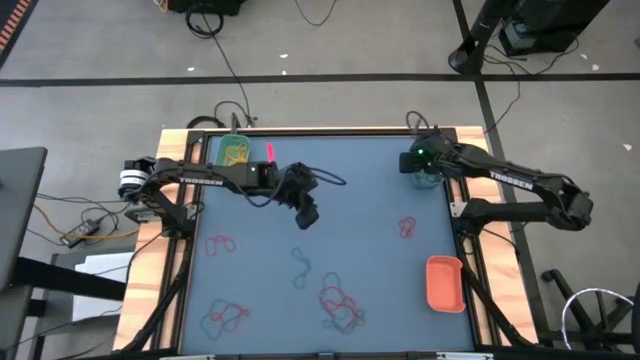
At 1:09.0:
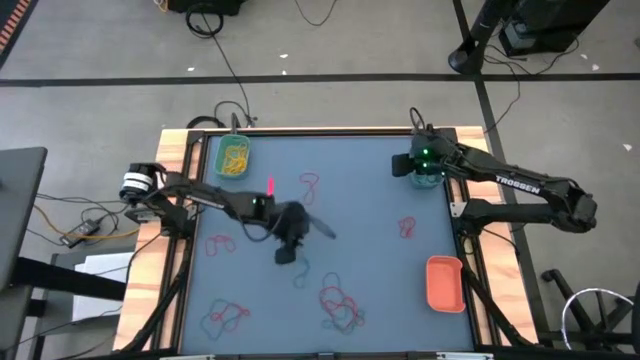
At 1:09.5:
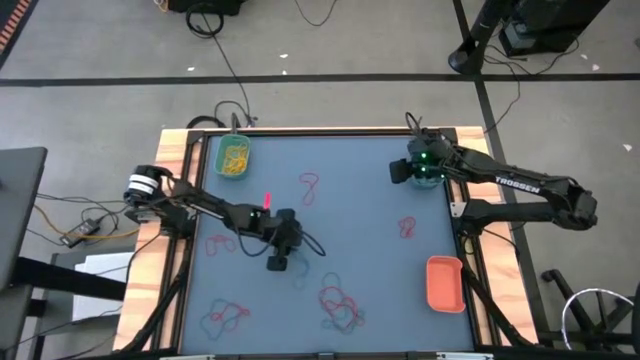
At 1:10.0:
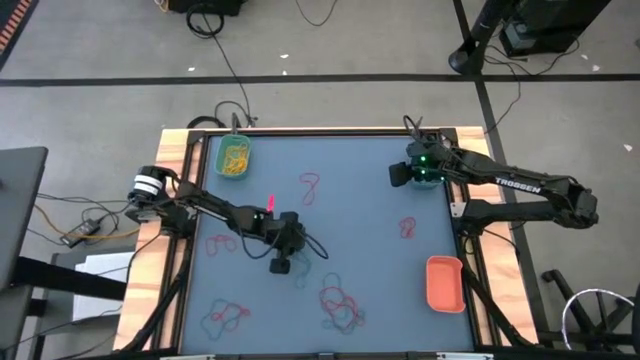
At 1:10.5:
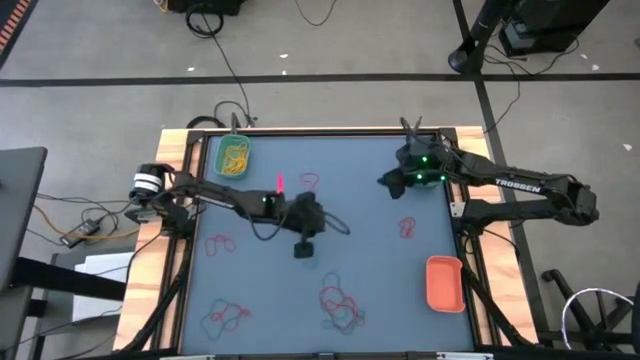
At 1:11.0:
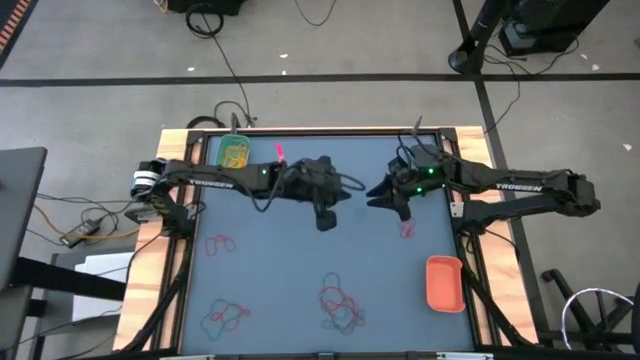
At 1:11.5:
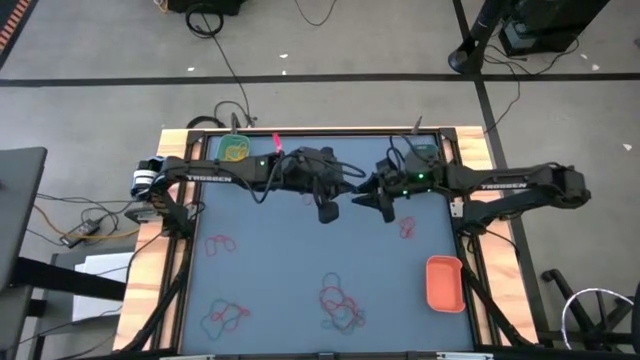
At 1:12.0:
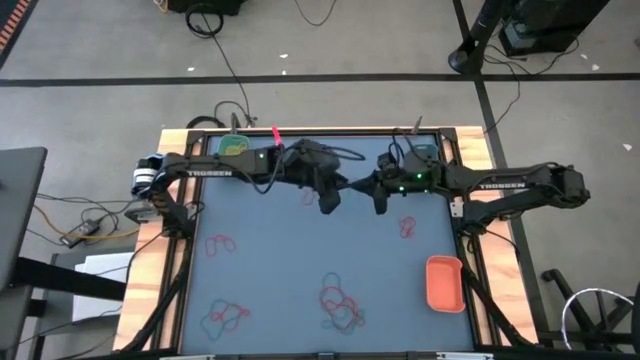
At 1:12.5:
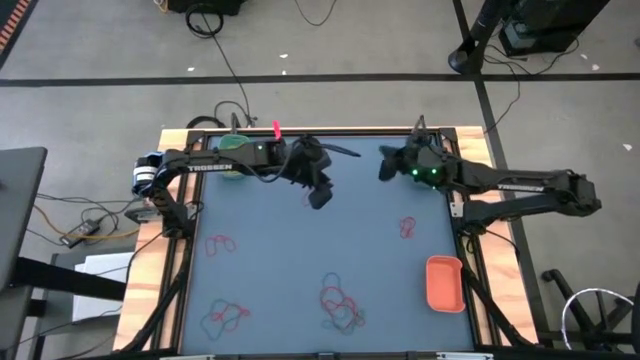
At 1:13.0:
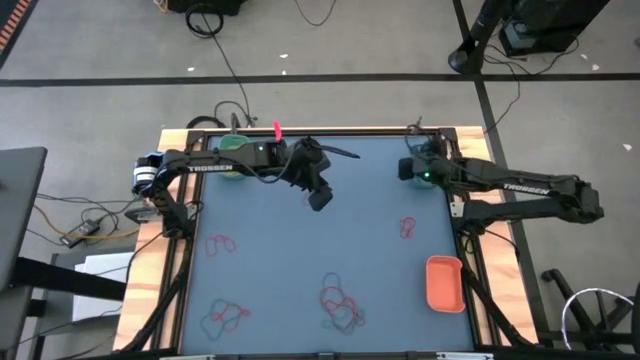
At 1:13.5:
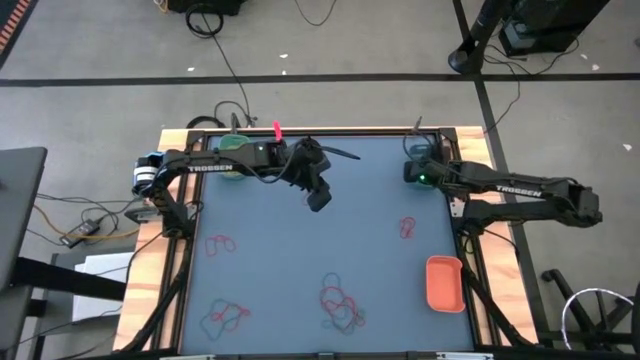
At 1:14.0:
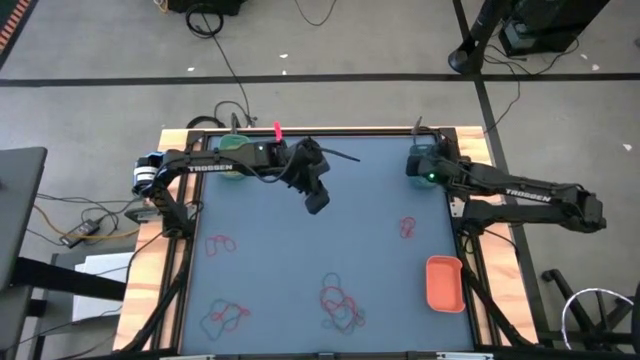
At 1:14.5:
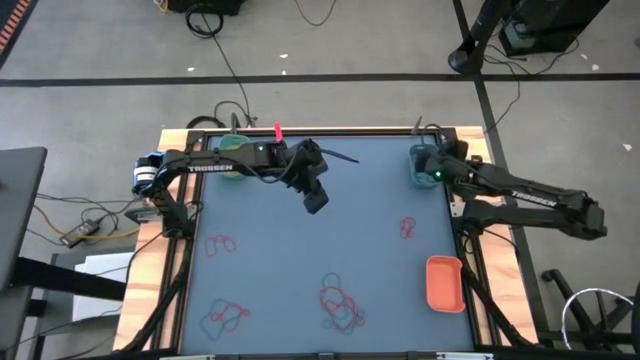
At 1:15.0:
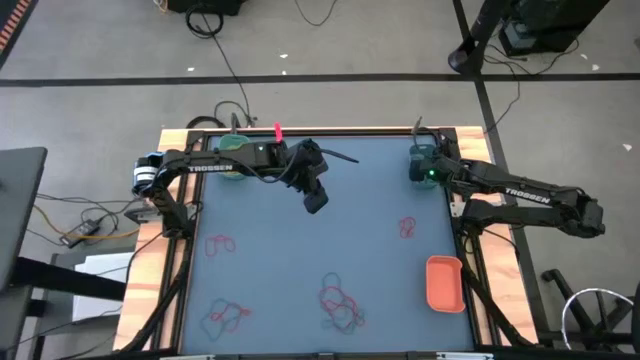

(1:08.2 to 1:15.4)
Task: Sort rubber bands into baskets
Put the blue rubber band into the blue bin

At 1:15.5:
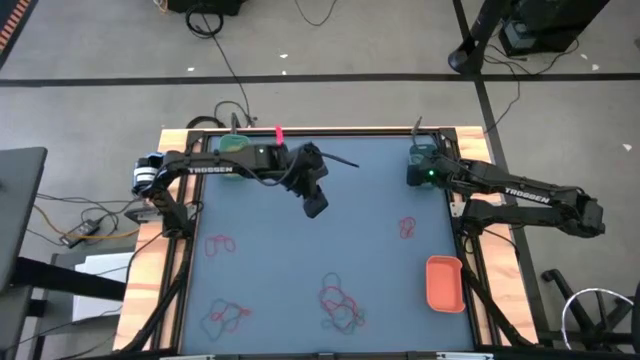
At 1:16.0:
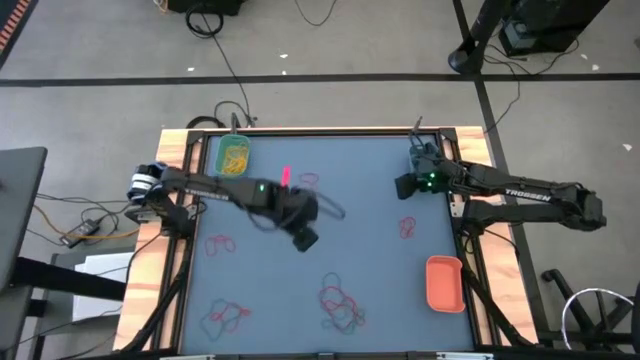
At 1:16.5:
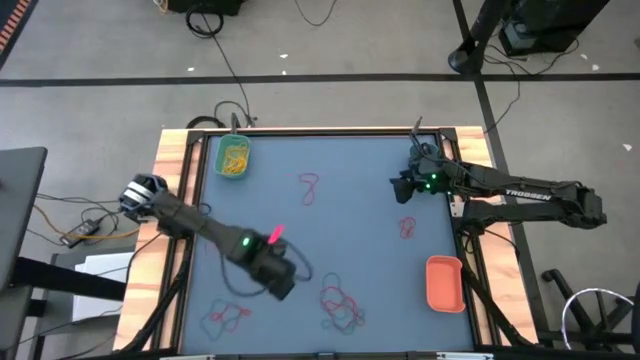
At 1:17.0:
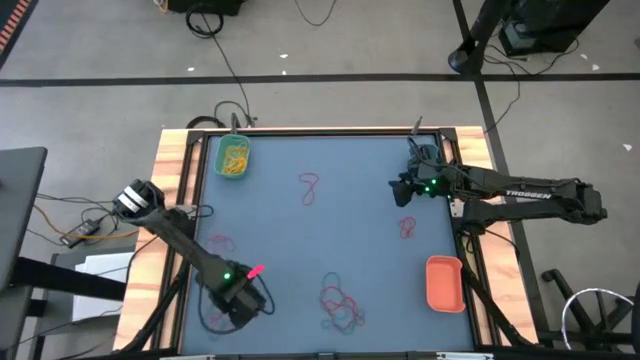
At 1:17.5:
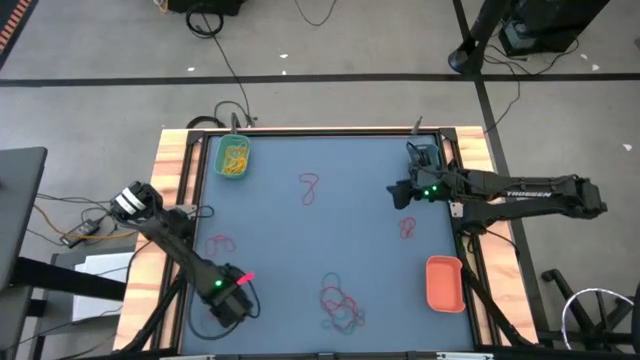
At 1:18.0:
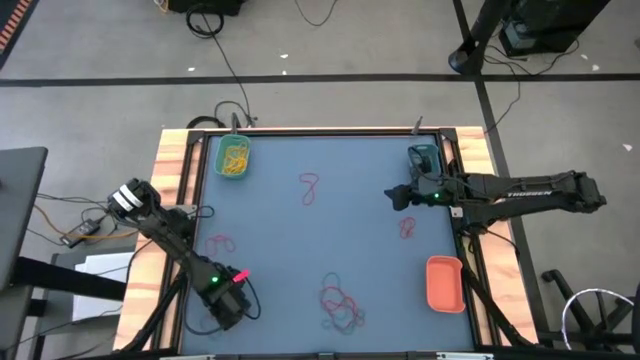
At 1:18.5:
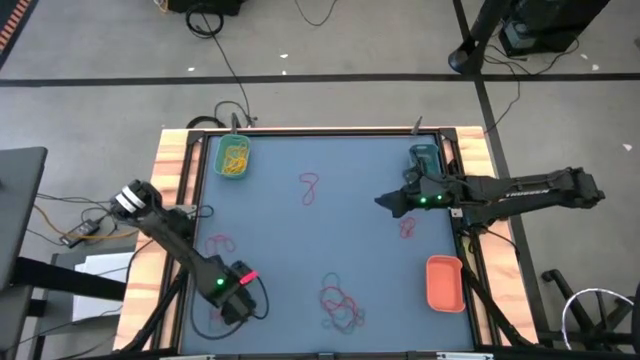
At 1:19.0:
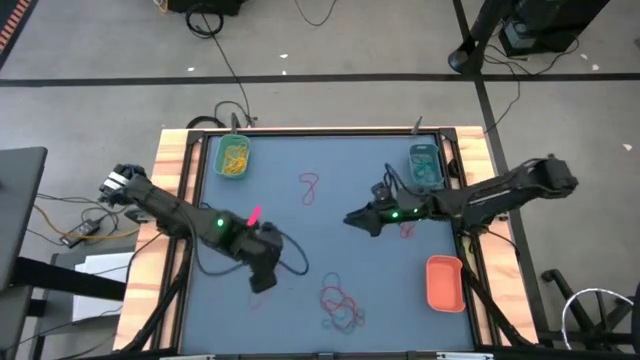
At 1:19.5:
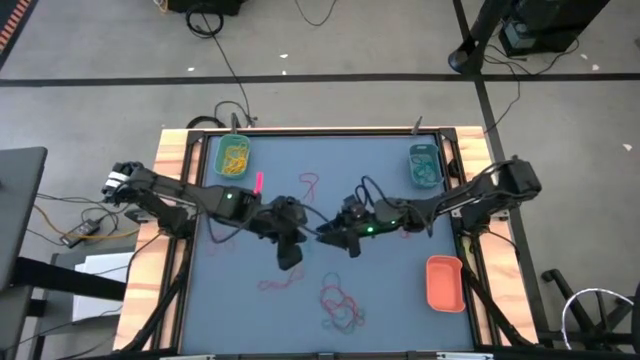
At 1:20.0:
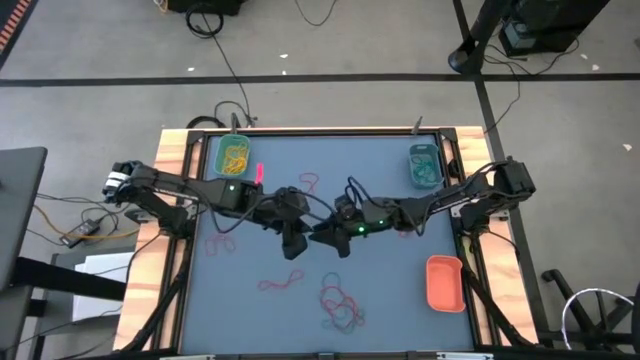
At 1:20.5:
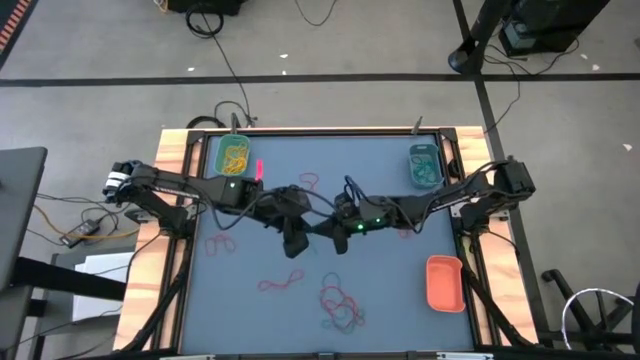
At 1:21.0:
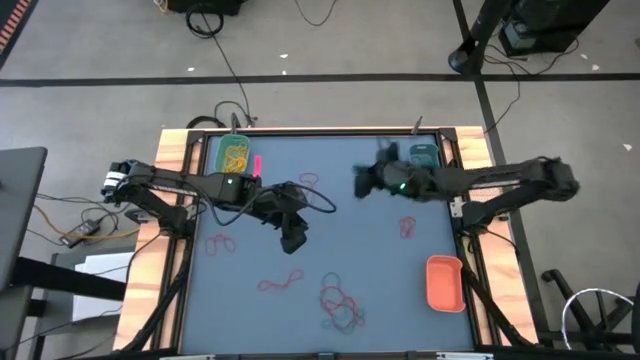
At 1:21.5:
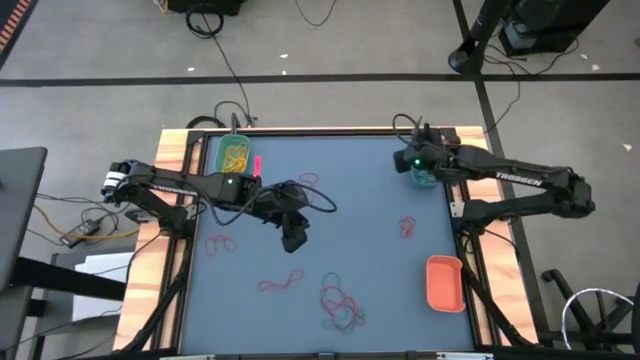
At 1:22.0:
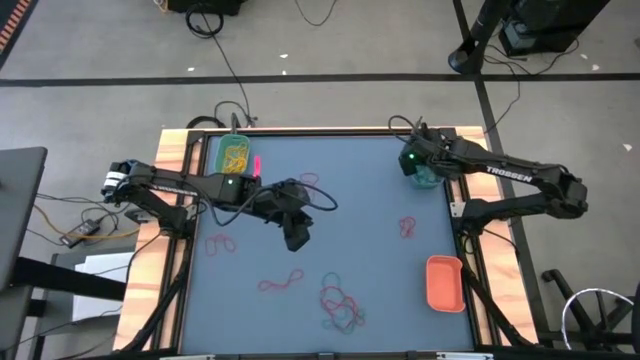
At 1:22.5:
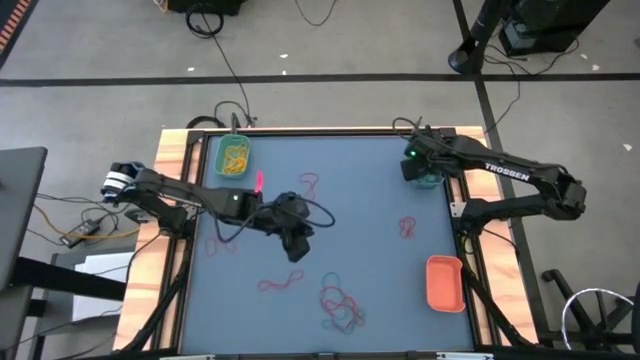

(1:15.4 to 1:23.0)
Put the blue rubber band into the blue bin

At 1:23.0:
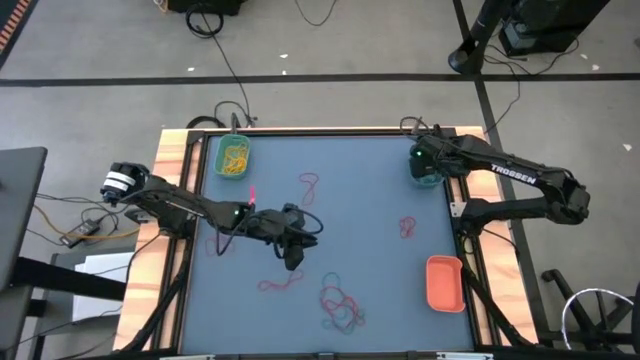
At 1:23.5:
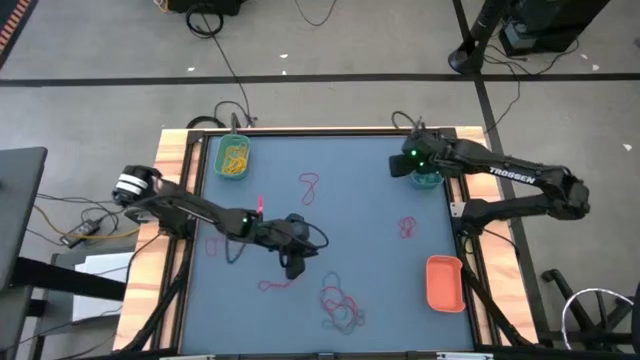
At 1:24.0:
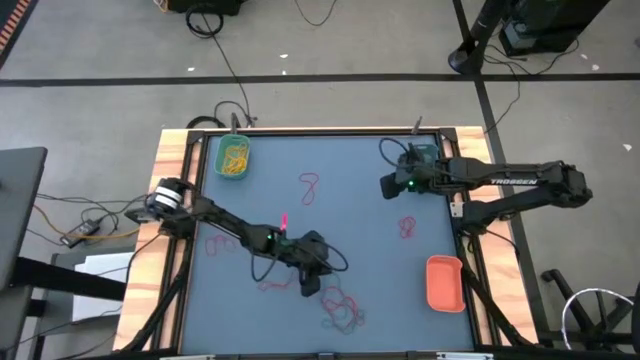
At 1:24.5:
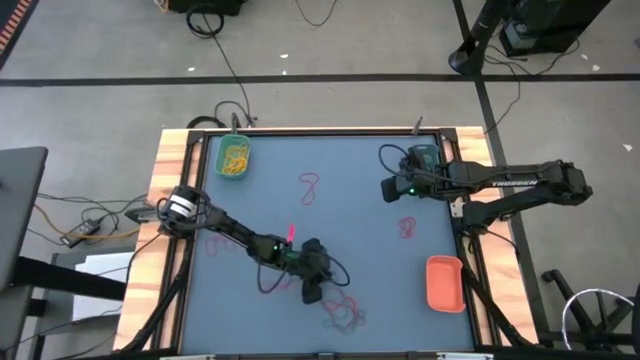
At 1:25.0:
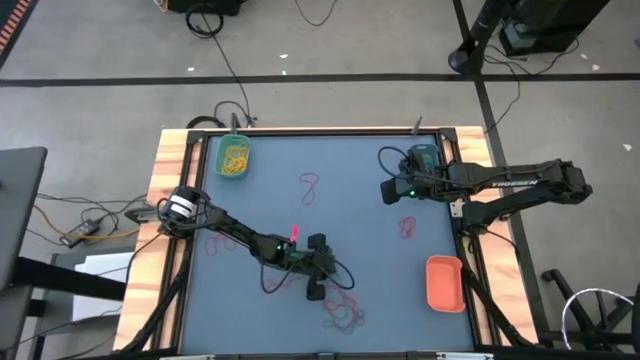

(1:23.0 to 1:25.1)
Put the blue rubber band into the blue bin

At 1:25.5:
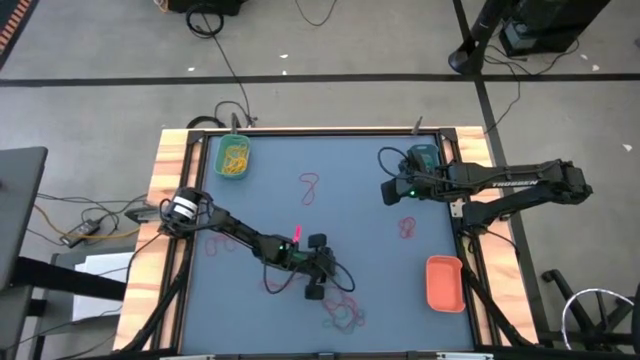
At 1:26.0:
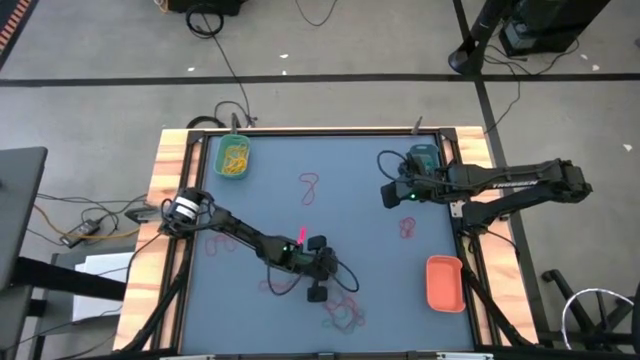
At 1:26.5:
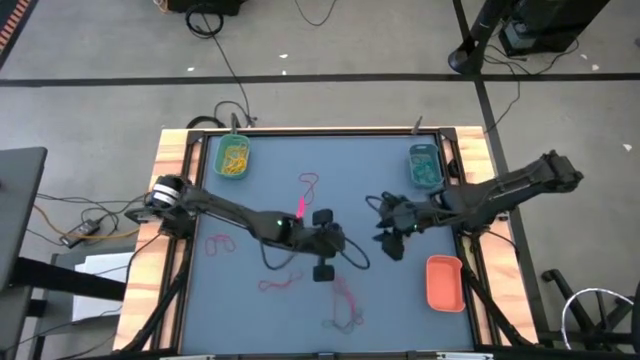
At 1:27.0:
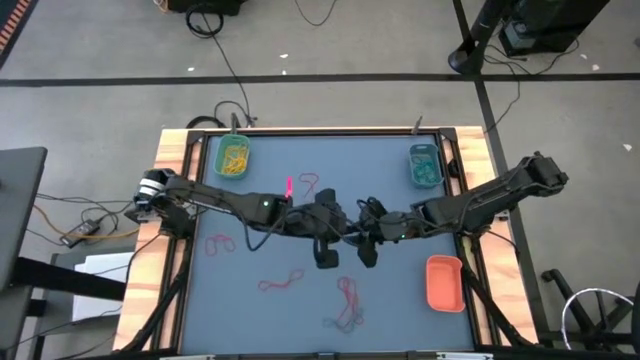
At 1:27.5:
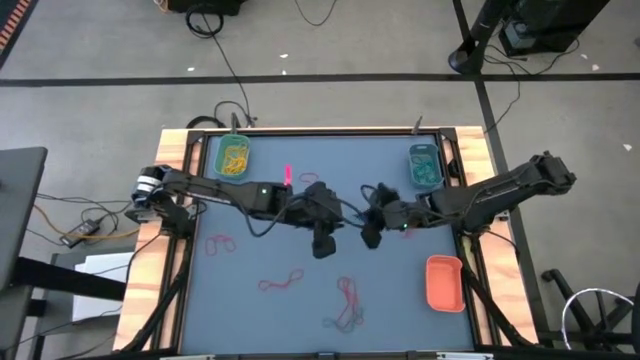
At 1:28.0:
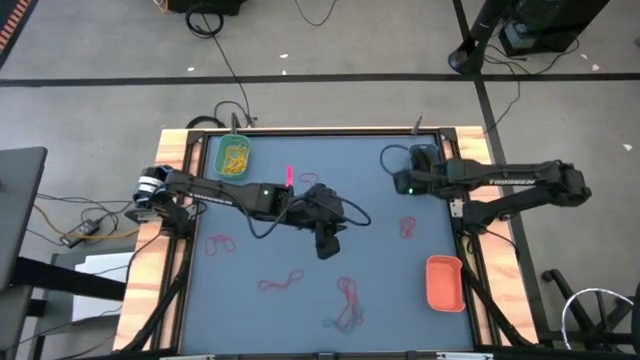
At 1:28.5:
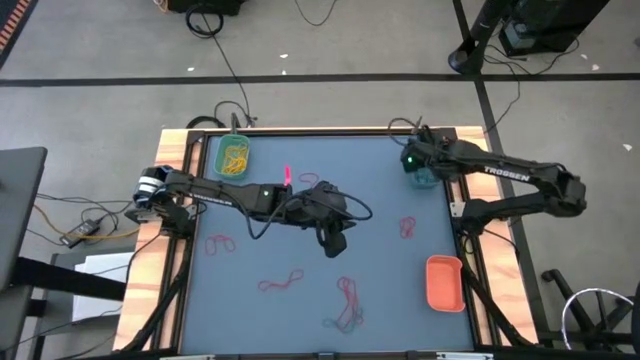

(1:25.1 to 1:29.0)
Put the blue rubber band into the blue bin
